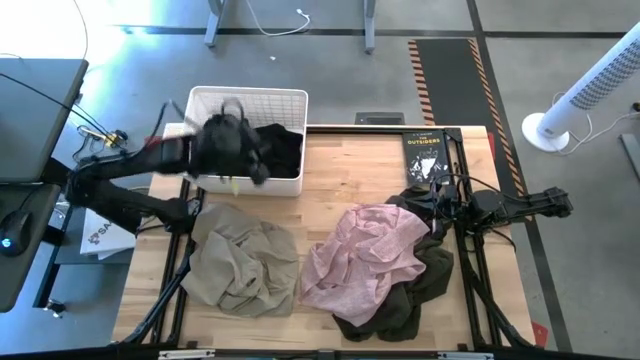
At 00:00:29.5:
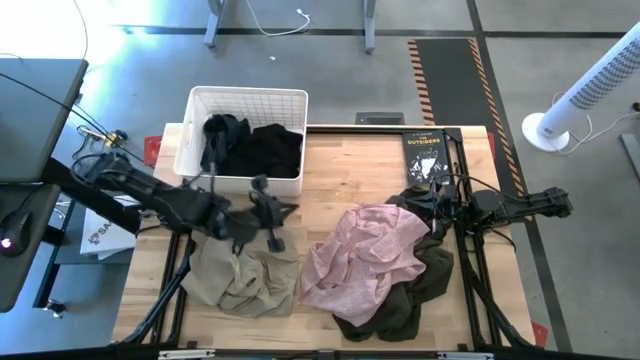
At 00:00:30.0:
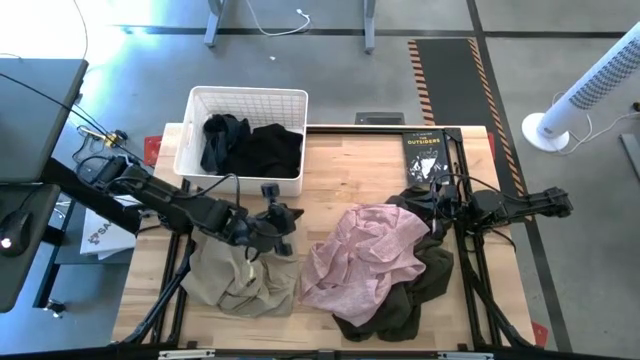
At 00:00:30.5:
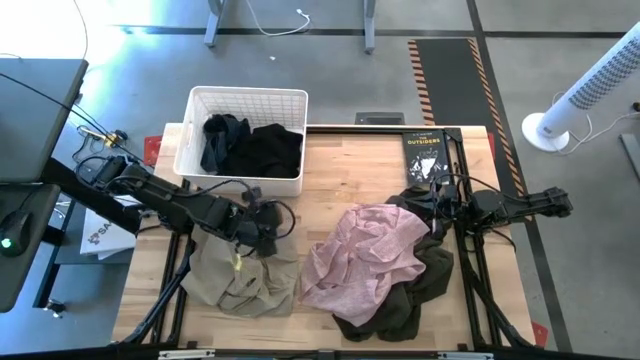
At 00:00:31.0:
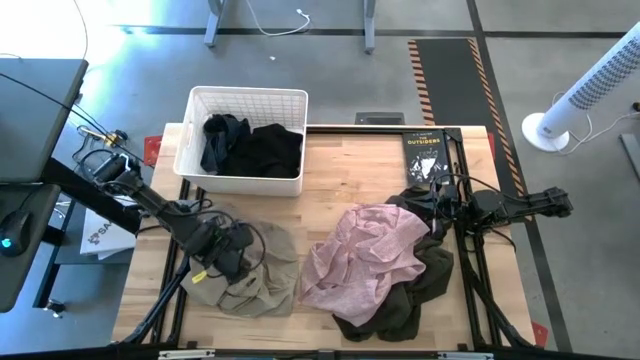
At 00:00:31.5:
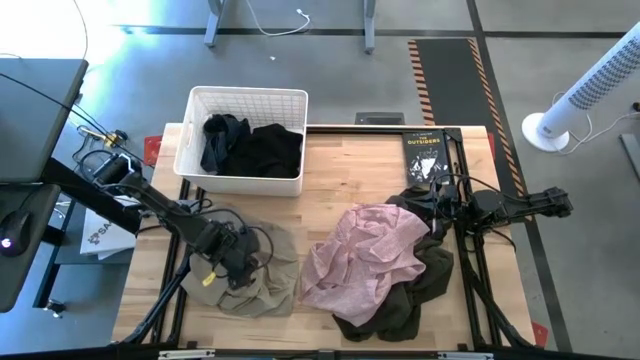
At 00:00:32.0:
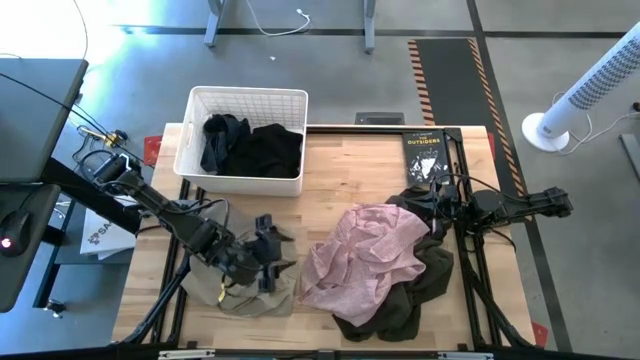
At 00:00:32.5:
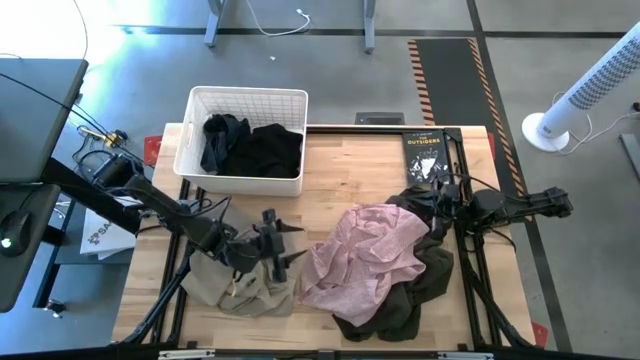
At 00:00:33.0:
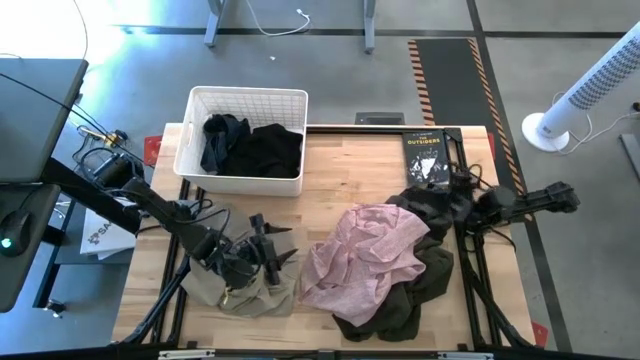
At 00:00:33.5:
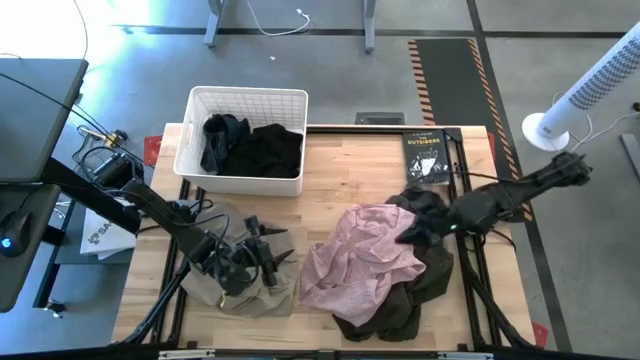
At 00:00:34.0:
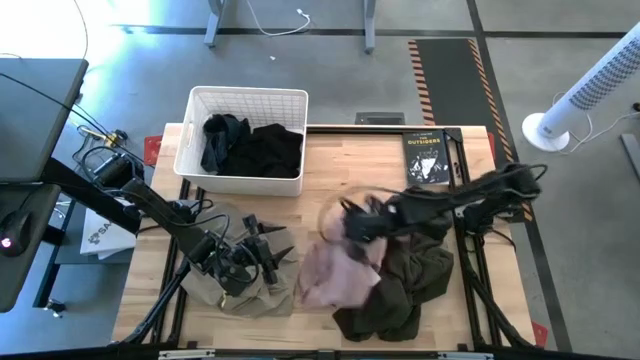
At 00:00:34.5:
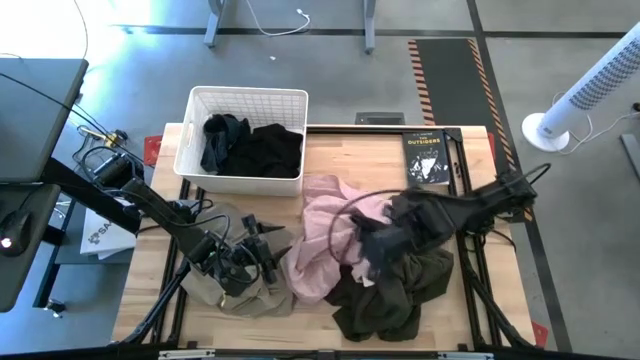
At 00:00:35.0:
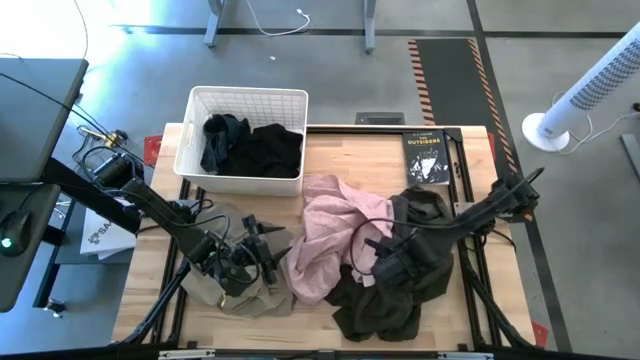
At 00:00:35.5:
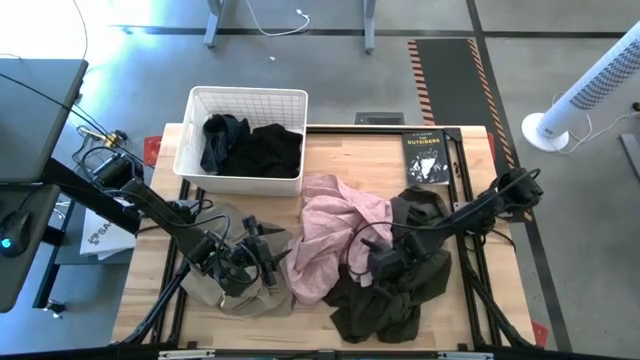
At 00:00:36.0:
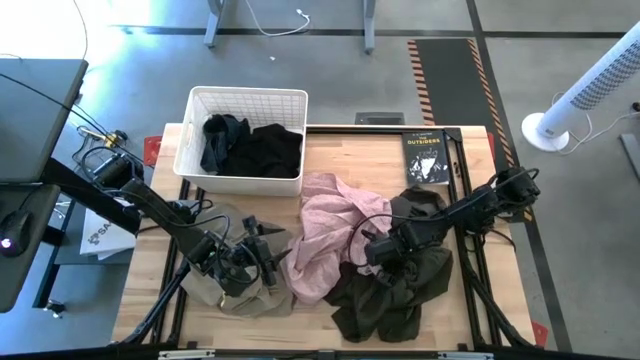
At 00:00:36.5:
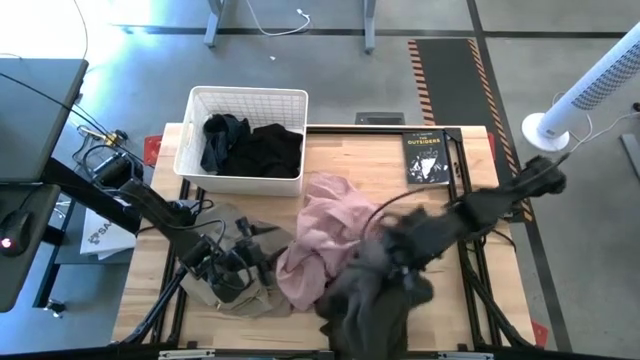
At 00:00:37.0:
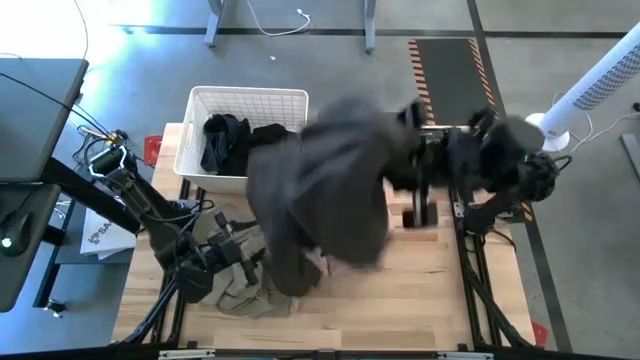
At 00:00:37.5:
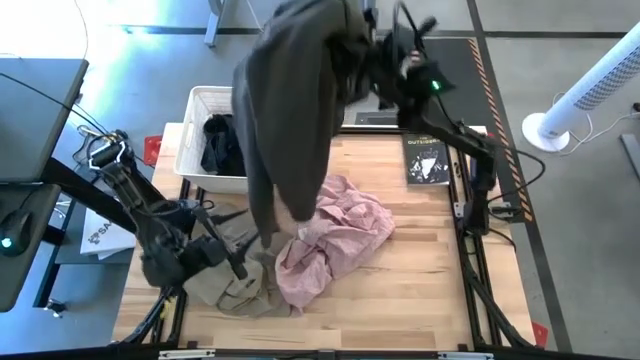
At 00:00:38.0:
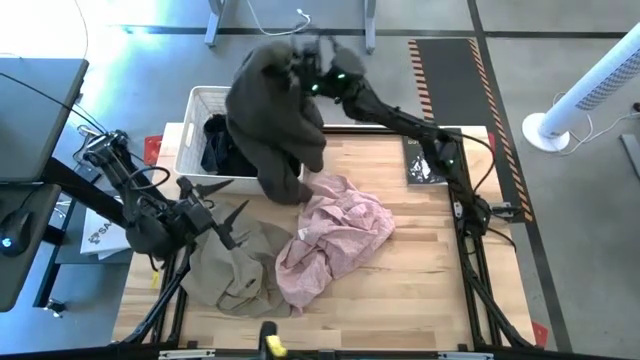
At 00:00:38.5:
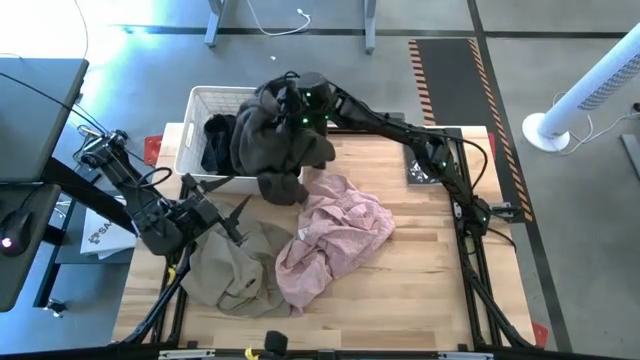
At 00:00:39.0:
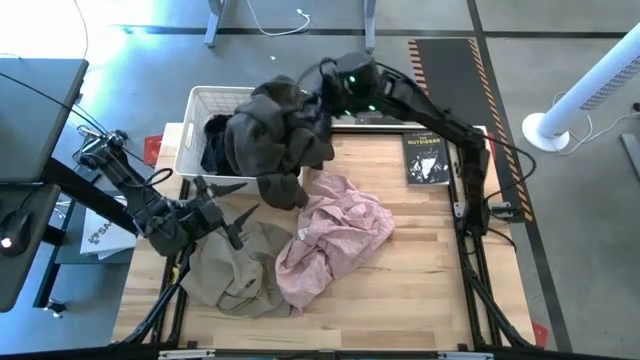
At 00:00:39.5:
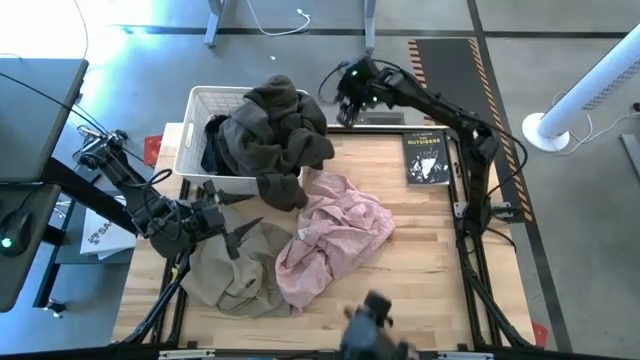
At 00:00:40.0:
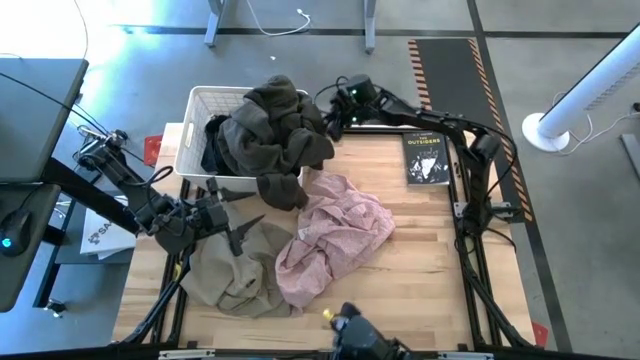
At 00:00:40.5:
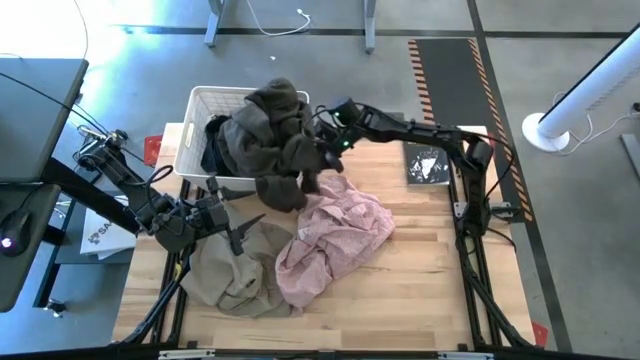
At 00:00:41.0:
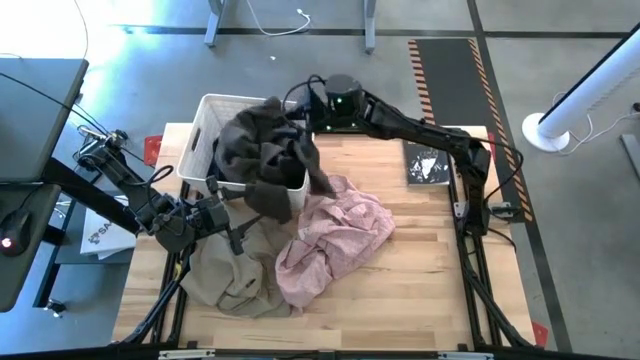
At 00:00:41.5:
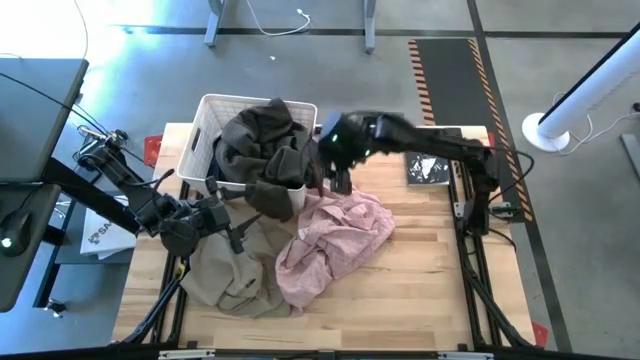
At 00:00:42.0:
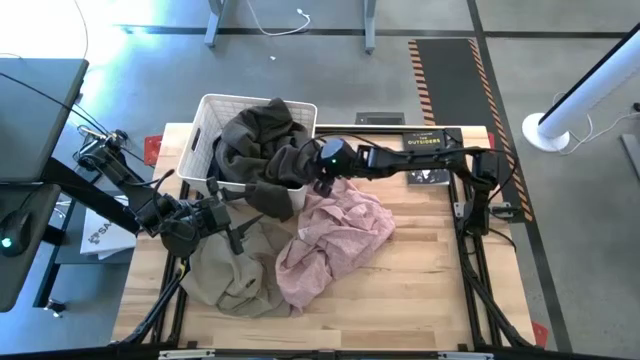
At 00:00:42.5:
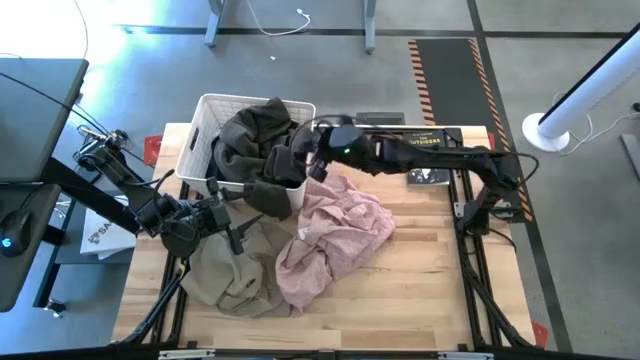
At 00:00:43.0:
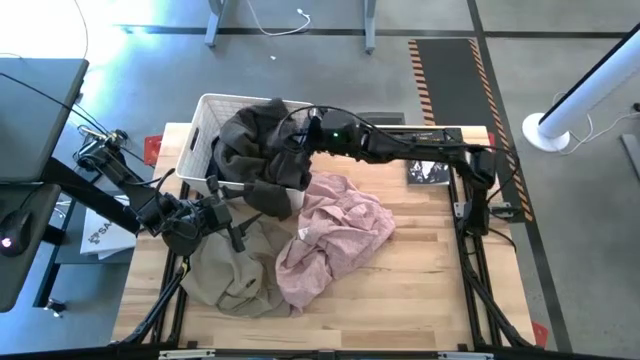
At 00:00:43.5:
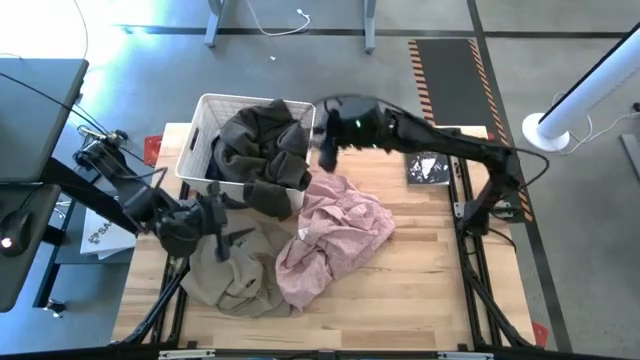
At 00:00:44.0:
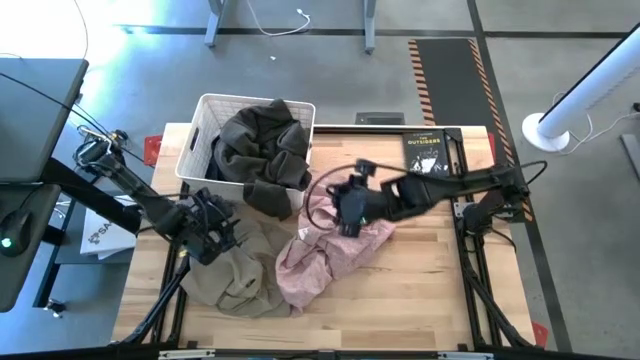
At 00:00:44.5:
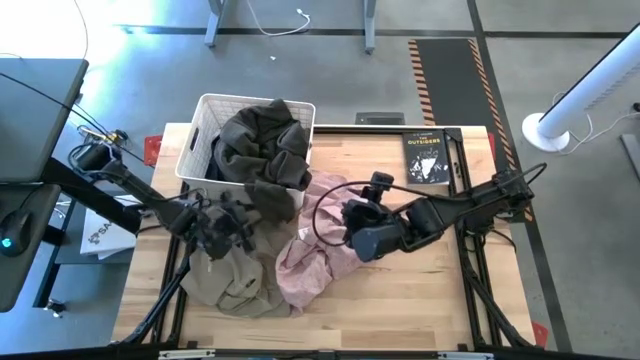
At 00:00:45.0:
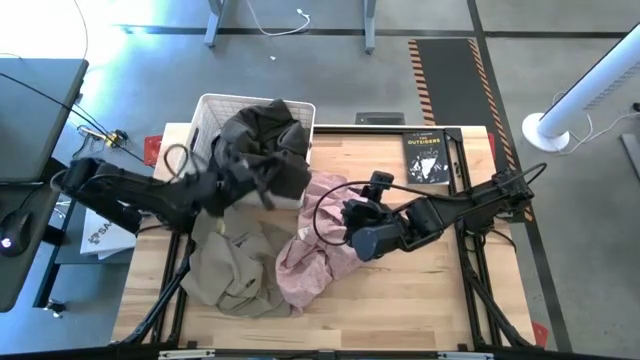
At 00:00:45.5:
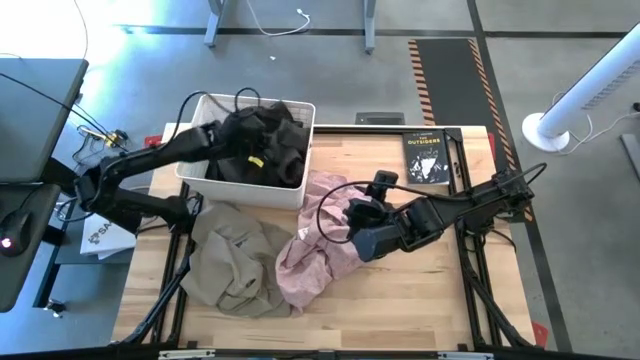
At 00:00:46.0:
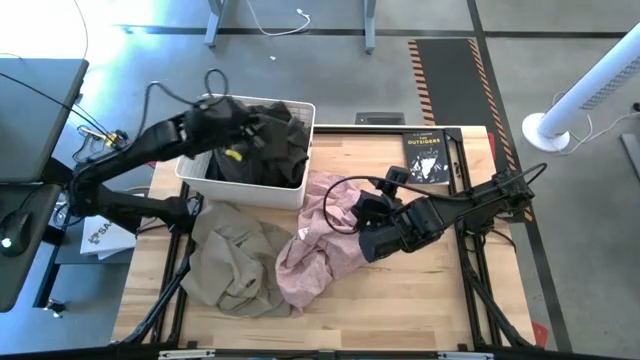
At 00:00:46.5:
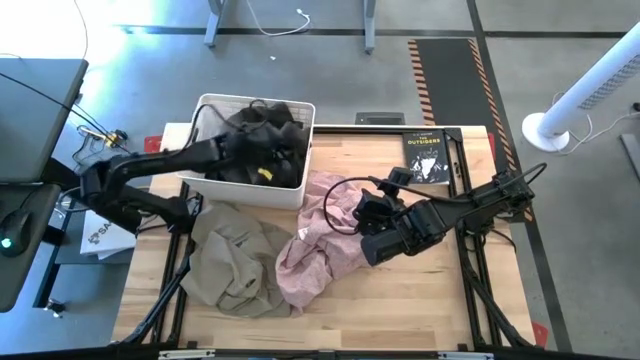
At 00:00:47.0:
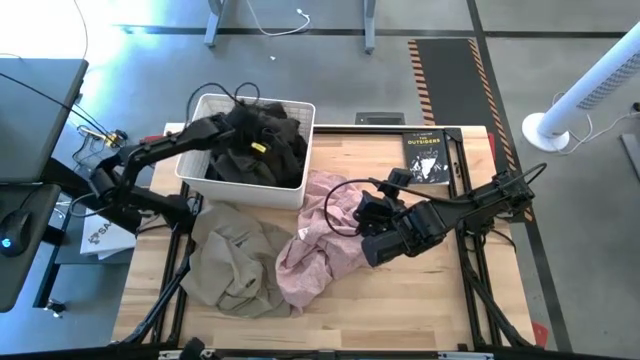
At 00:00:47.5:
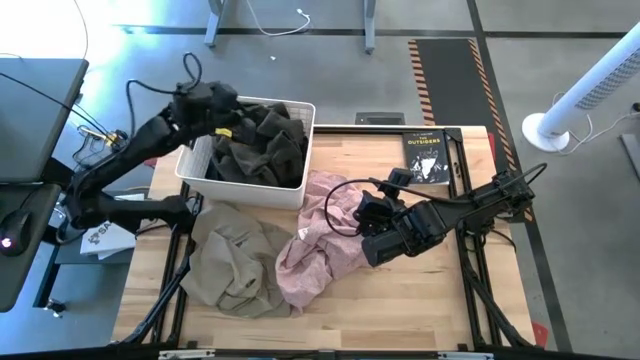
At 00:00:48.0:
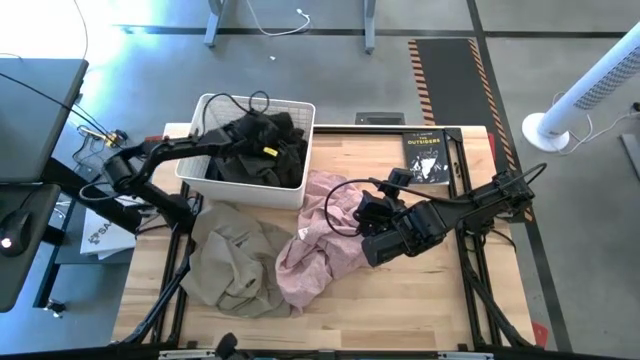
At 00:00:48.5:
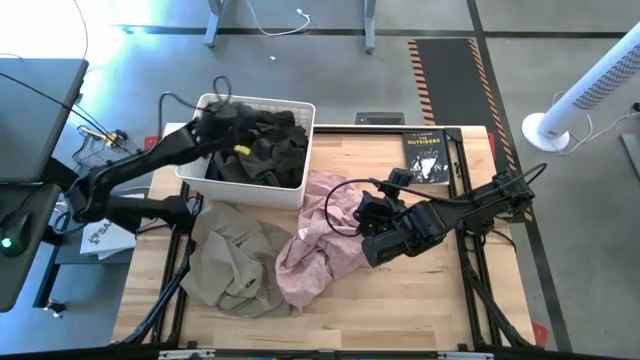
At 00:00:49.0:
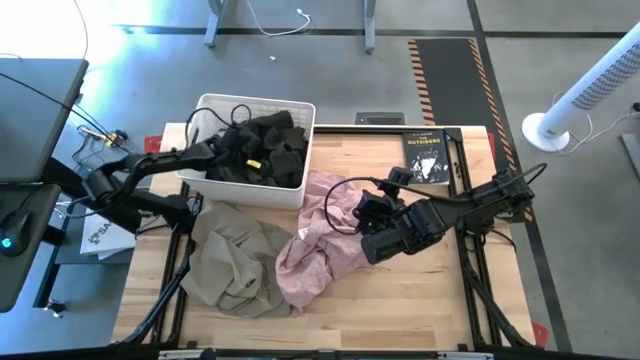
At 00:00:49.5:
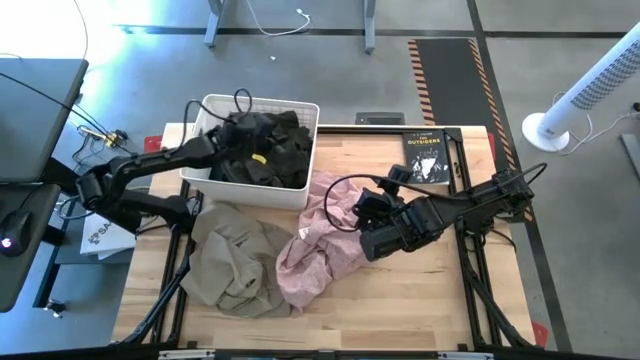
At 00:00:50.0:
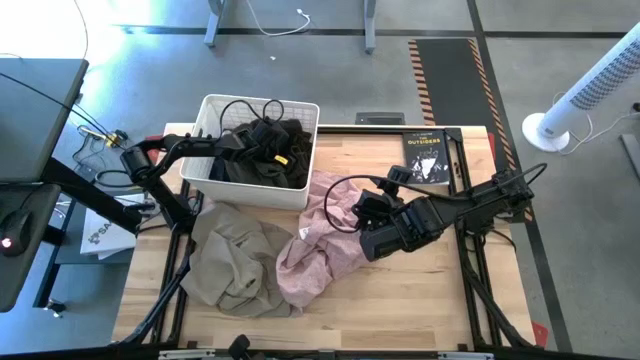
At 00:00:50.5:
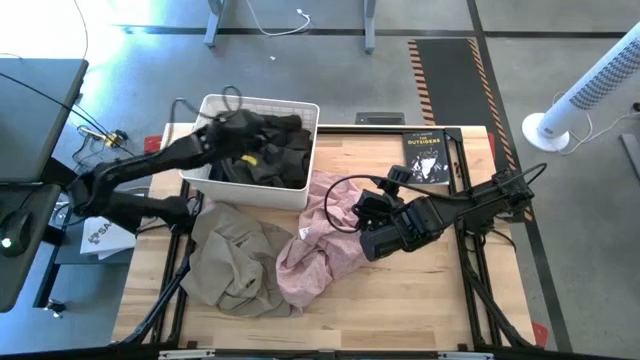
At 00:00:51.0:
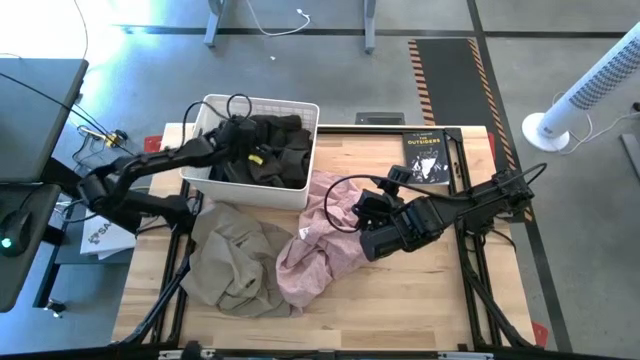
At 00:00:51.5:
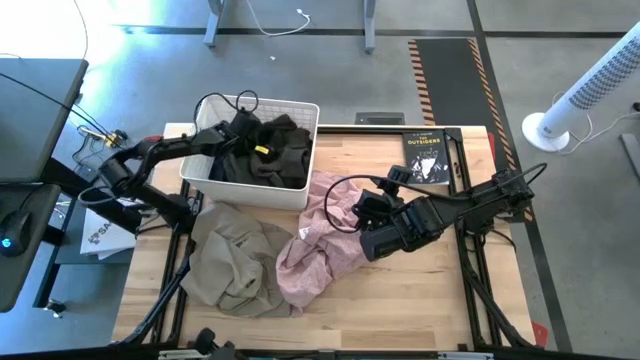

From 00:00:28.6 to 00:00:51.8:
Task: Sort clothes
Put the black jacket into the laundry bin
